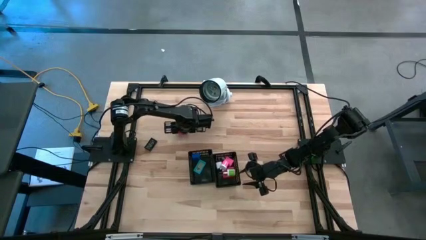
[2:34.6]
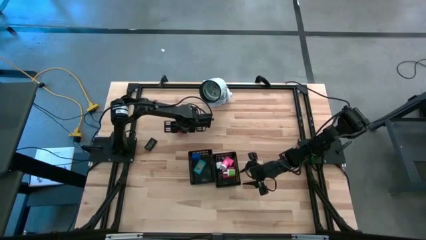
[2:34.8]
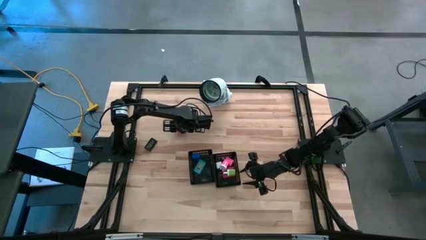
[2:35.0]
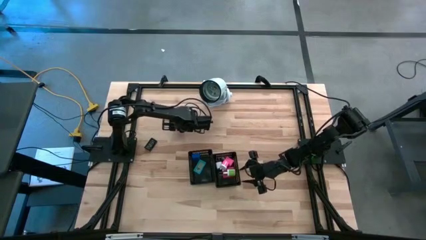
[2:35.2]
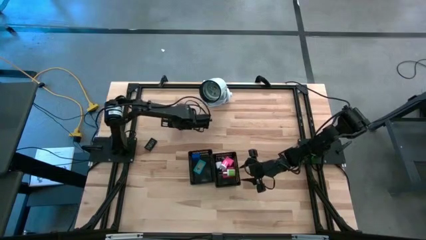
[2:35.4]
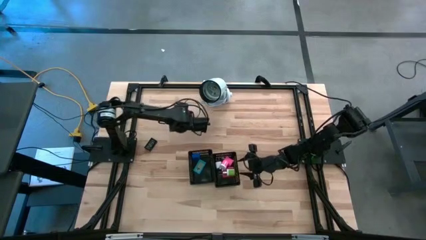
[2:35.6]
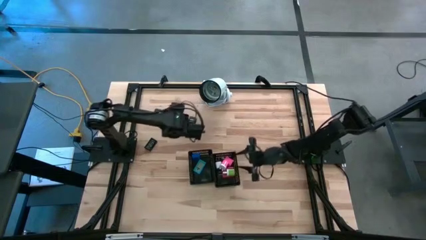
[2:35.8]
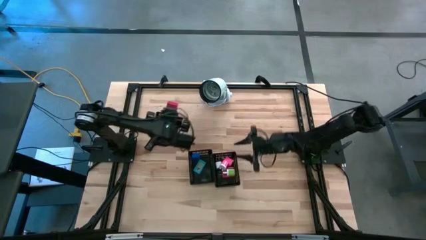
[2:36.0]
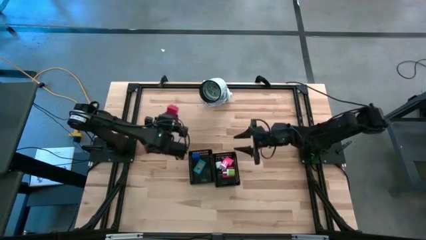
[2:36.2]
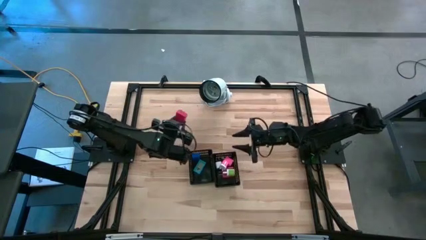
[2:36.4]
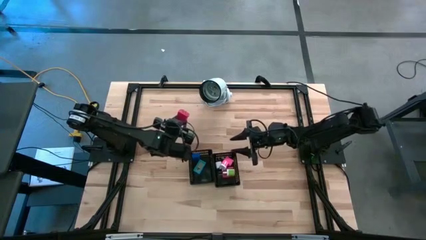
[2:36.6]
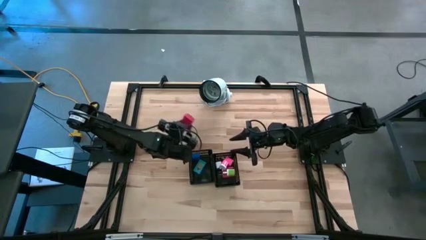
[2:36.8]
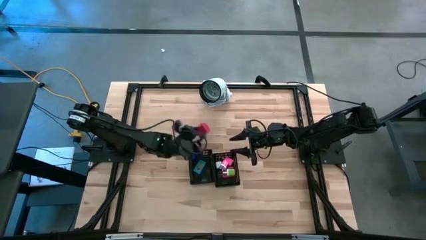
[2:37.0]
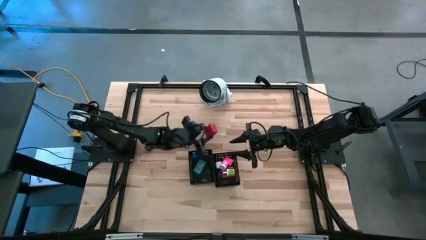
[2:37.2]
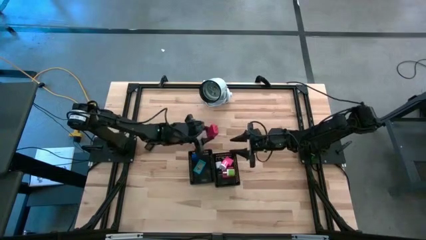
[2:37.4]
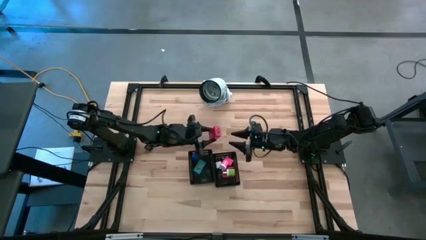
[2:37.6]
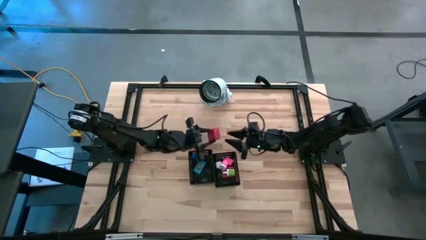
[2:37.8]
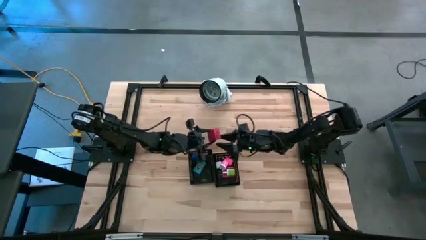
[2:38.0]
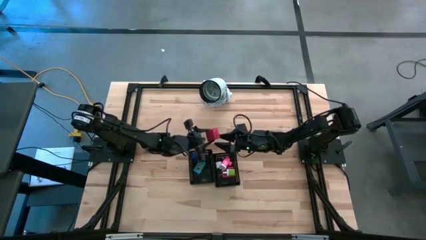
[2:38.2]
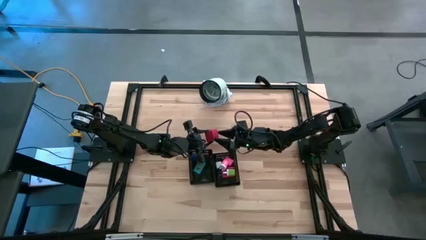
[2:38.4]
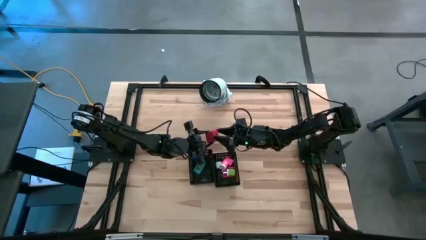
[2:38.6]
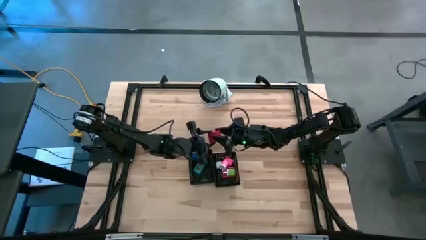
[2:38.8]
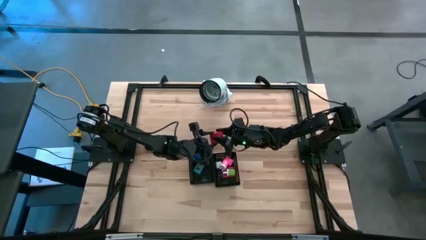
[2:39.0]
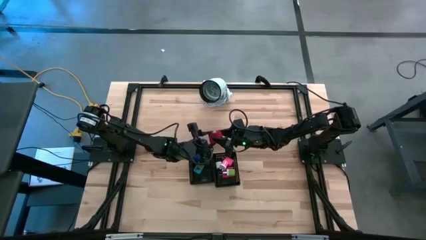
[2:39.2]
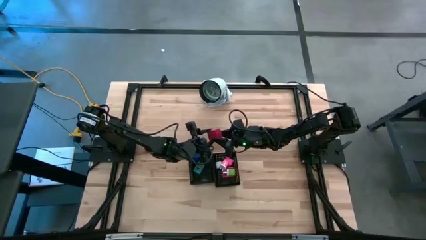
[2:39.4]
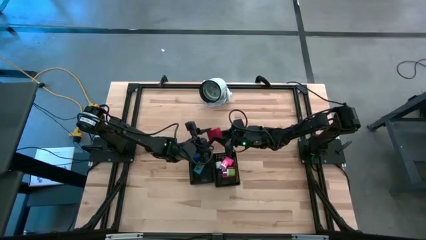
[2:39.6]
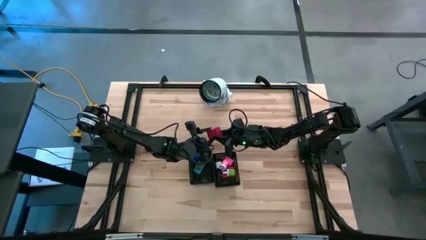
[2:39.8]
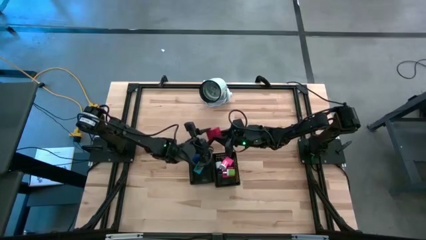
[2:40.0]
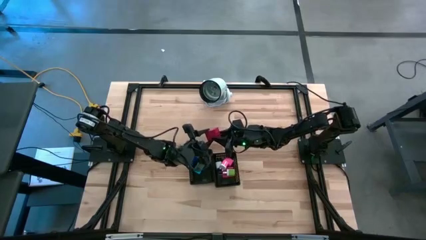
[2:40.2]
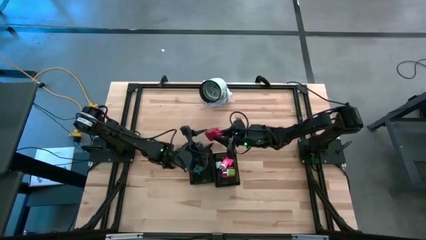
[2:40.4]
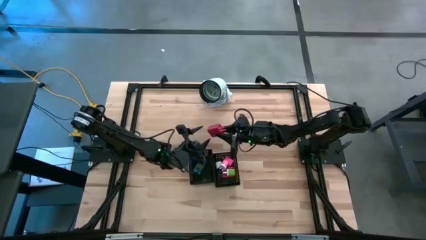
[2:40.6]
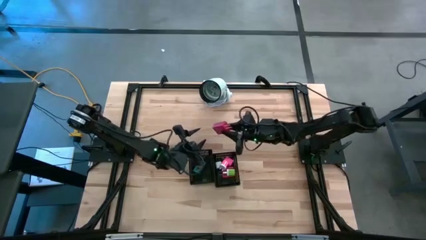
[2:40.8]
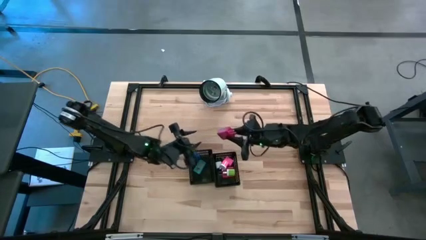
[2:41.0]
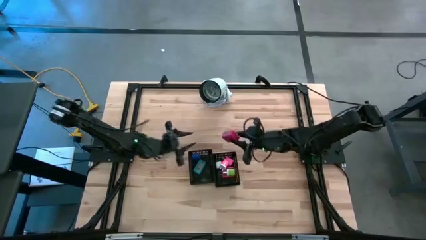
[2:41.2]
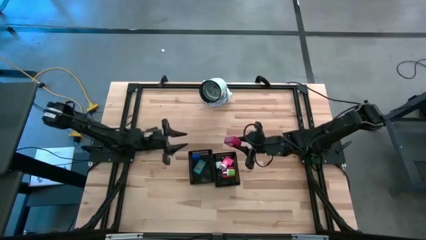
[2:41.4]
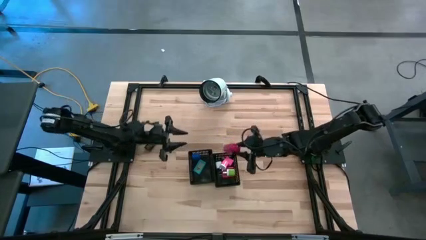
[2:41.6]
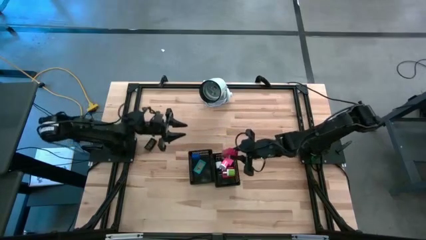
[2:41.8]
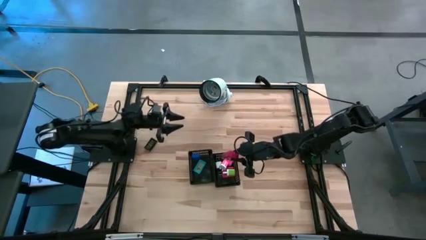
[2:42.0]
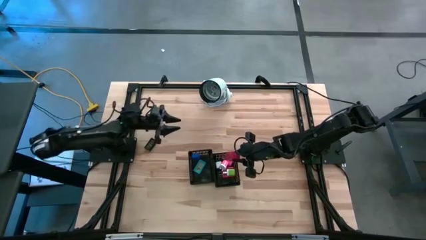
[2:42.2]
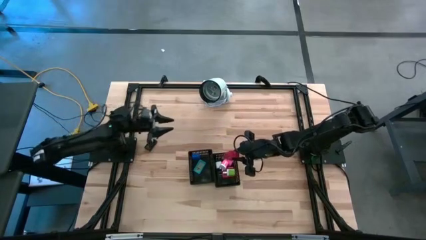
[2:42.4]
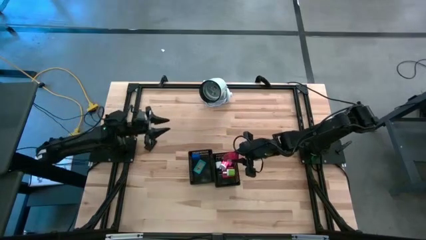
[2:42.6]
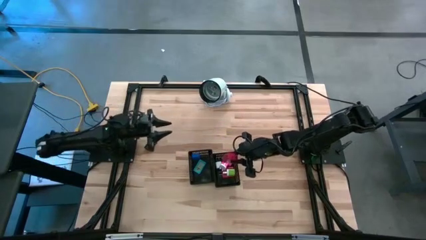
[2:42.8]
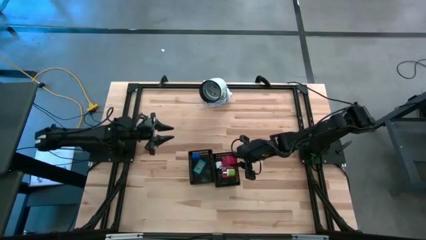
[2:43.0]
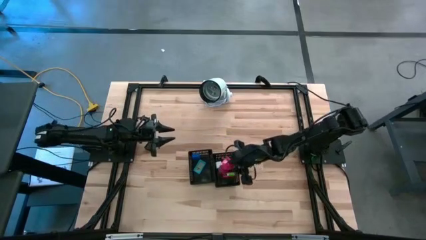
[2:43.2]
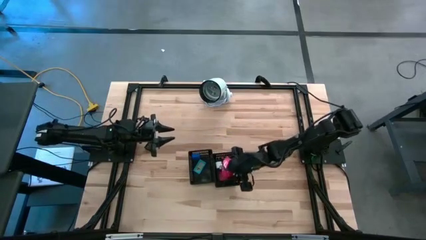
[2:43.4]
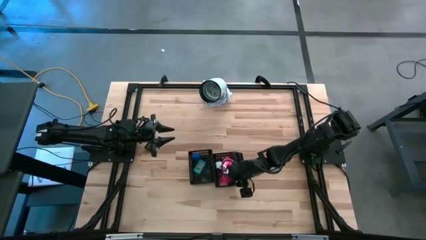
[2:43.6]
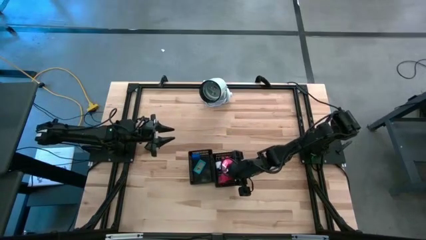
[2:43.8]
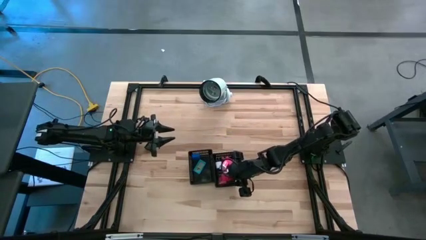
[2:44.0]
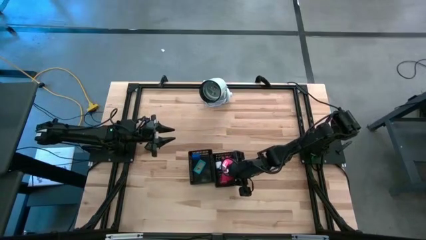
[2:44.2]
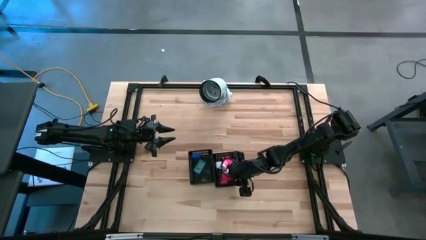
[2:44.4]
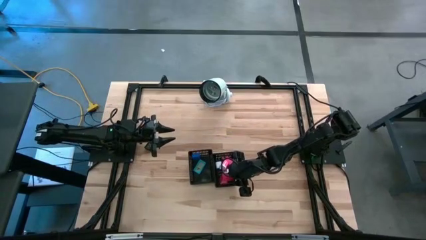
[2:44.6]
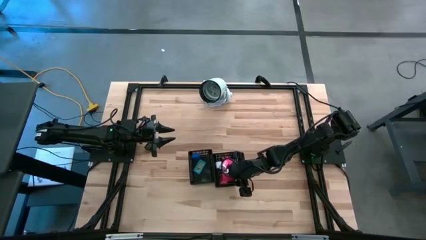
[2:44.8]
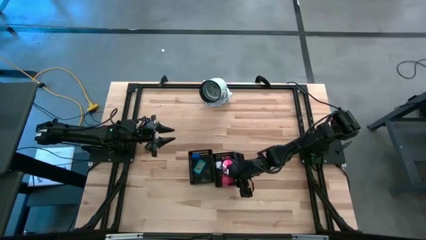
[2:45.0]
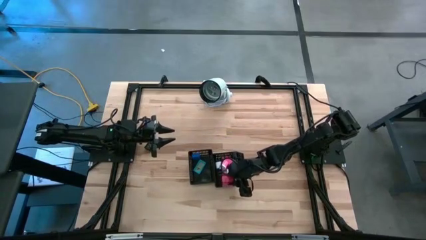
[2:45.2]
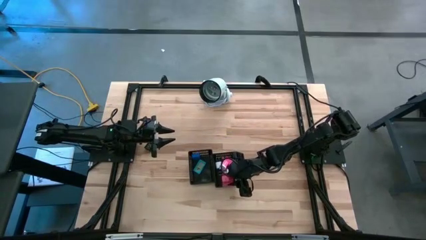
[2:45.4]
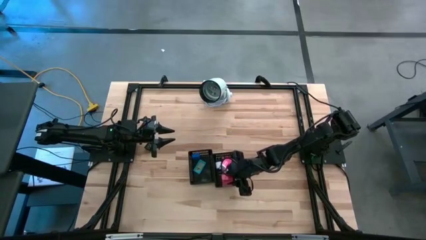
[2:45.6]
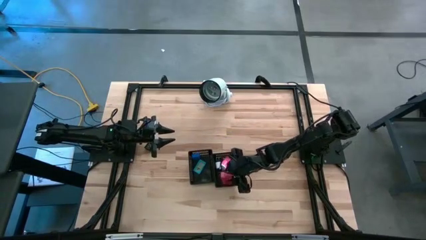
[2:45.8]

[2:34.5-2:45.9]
Task: Pick & Place Office items
Put the red charger adapter into the right black bin

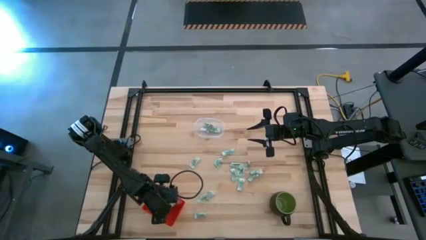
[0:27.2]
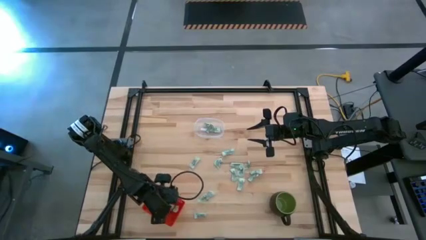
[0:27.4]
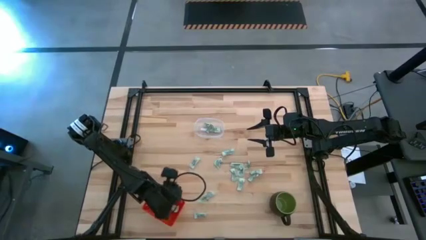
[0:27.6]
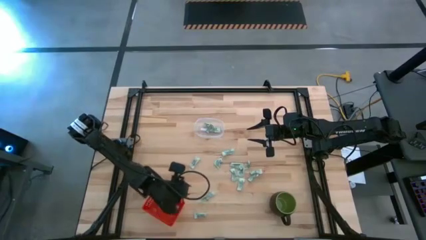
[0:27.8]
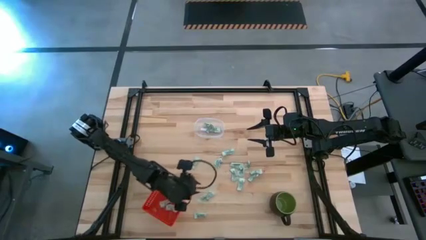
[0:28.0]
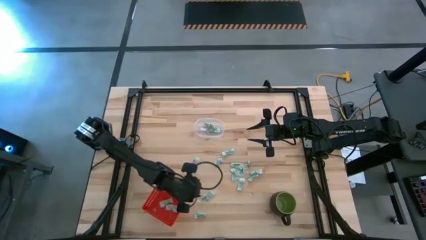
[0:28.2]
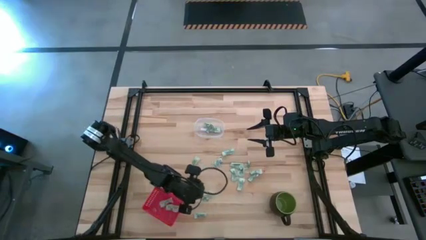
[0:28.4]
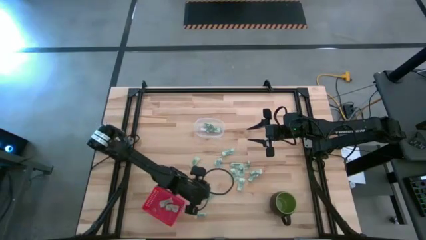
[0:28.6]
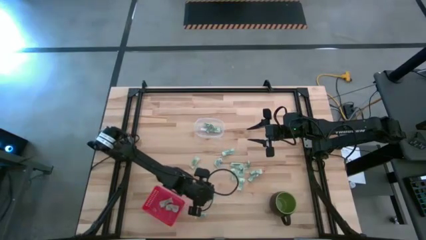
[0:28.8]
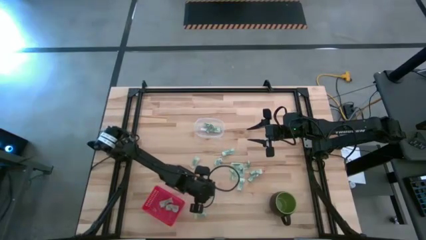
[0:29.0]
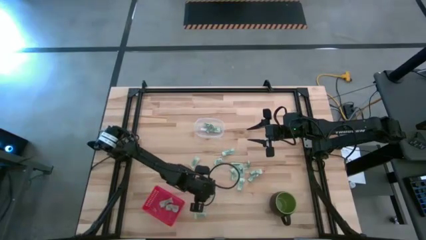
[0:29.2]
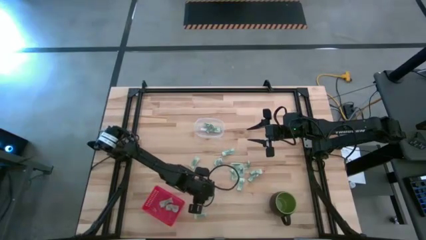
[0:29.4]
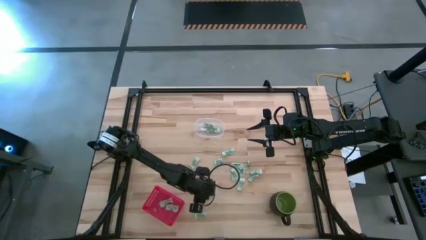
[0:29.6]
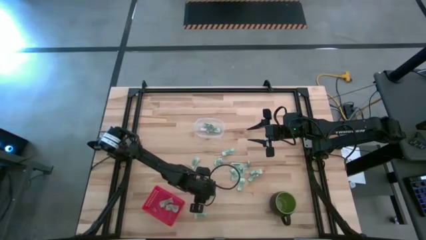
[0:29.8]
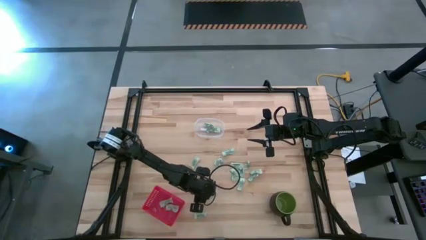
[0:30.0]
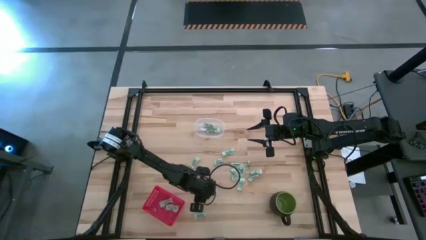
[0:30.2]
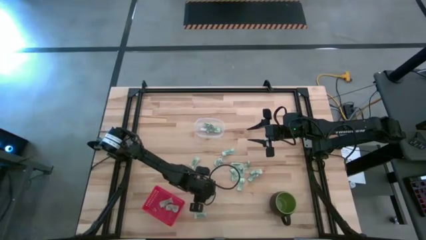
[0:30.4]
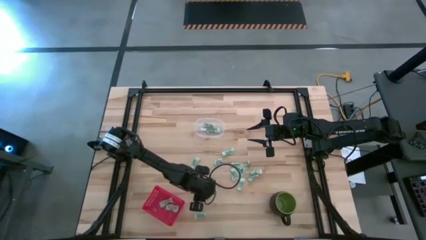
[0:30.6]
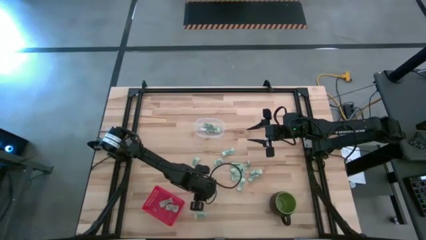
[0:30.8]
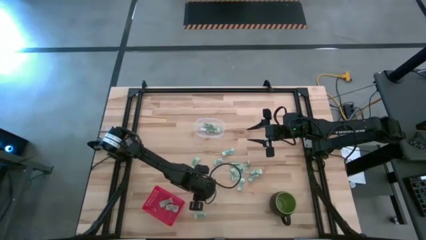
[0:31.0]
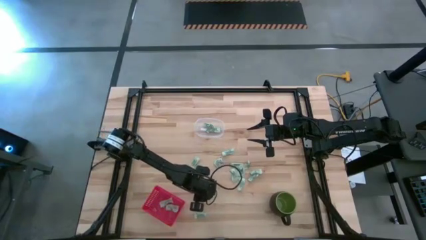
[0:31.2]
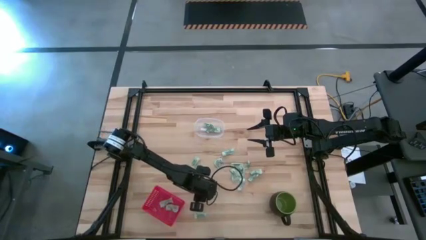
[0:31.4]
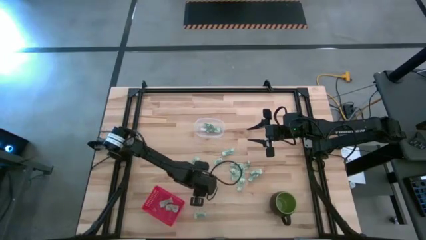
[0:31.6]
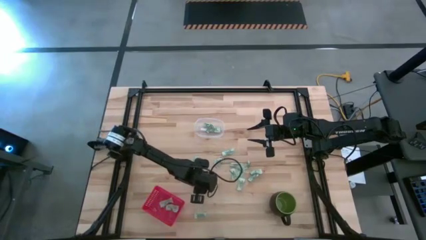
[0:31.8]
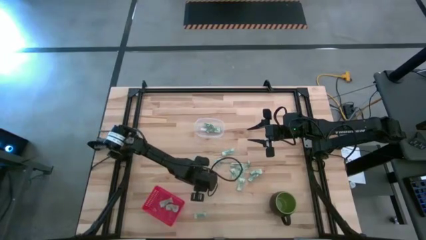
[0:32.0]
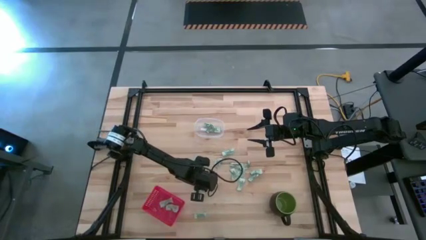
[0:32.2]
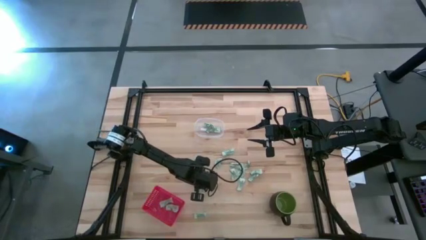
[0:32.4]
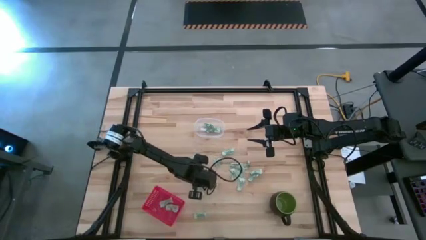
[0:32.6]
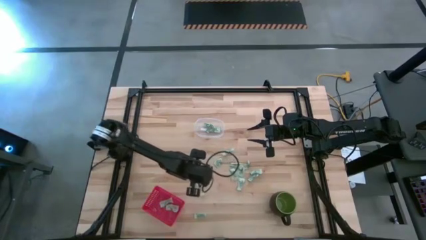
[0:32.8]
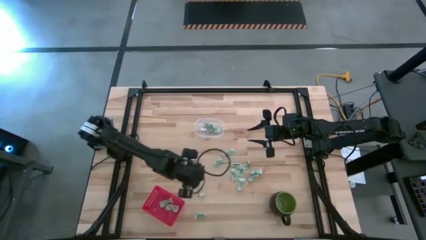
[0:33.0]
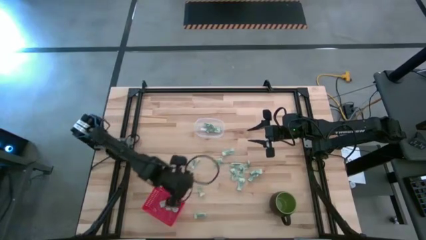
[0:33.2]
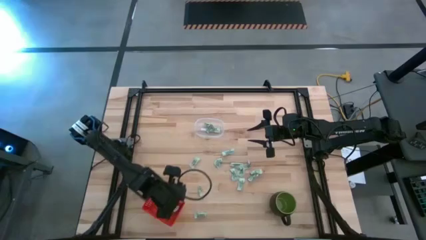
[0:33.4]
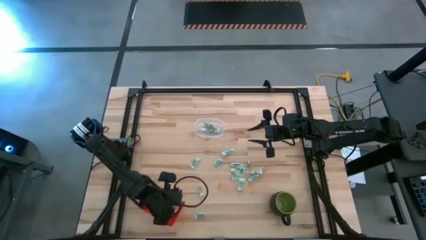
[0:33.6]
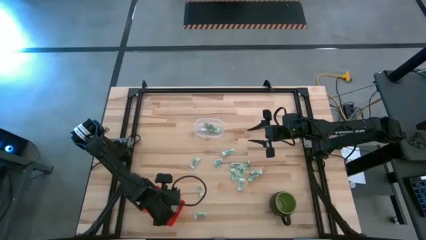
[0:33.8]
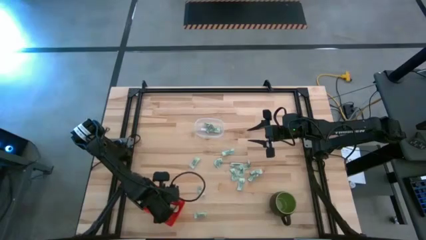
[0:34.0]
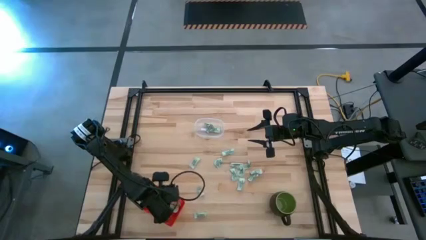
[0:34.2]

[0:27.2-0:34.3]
Task: Pick and place items into bin
Put the stevia packet into the orange bin
